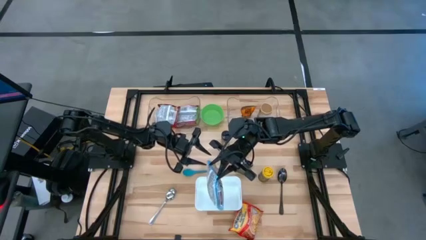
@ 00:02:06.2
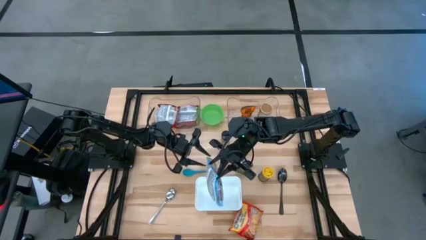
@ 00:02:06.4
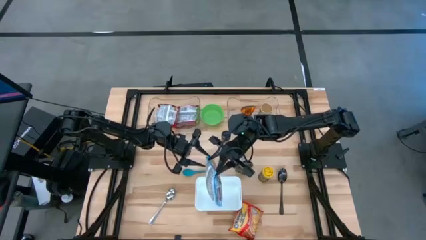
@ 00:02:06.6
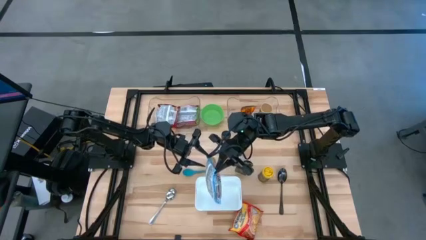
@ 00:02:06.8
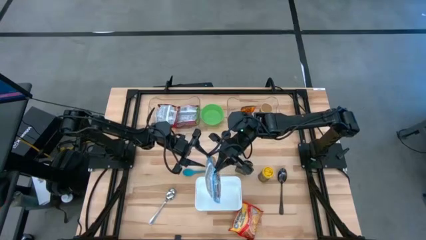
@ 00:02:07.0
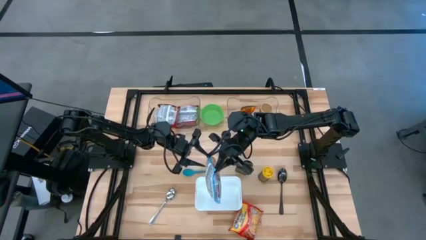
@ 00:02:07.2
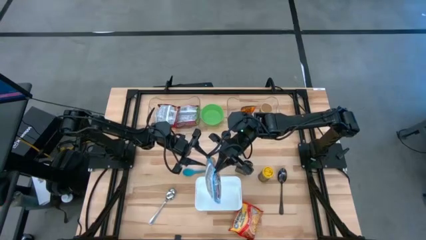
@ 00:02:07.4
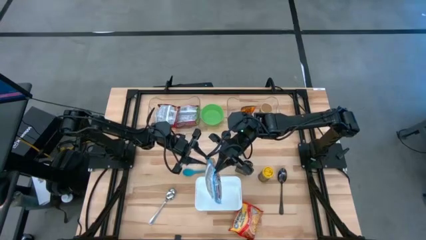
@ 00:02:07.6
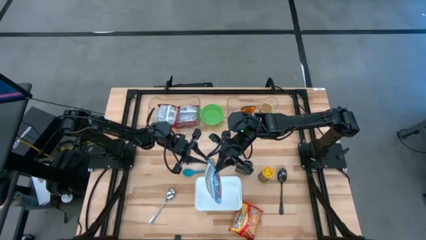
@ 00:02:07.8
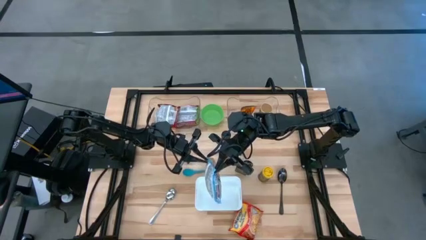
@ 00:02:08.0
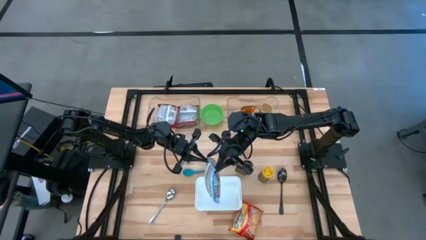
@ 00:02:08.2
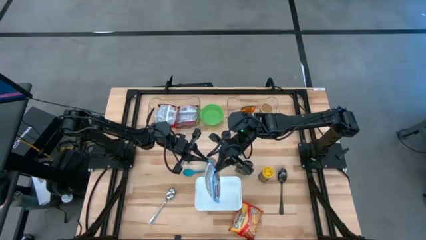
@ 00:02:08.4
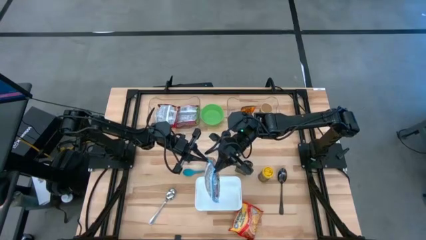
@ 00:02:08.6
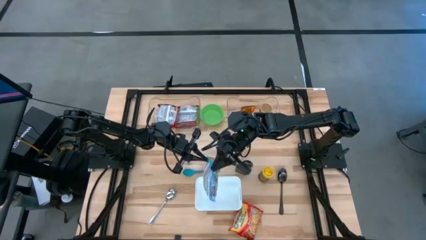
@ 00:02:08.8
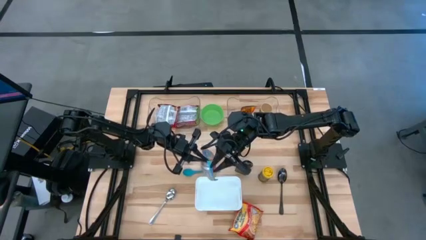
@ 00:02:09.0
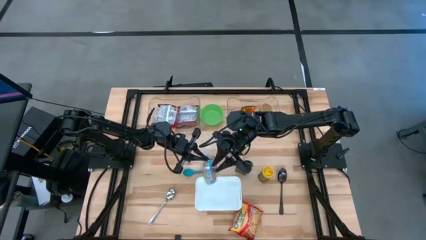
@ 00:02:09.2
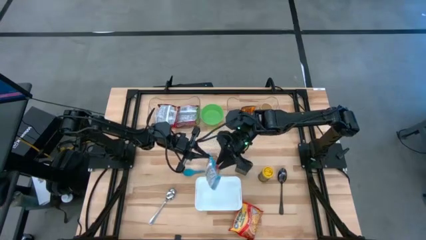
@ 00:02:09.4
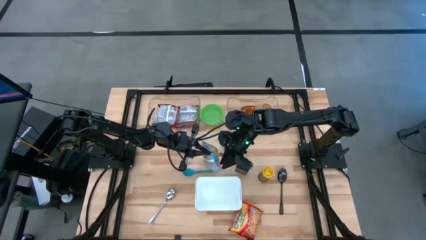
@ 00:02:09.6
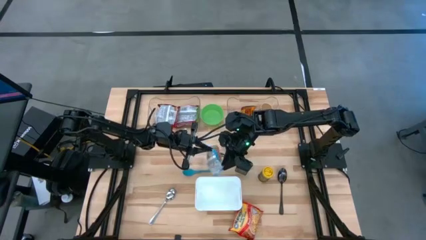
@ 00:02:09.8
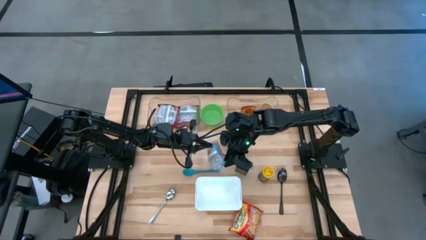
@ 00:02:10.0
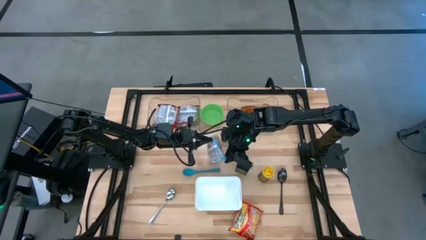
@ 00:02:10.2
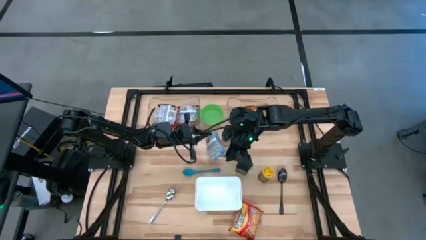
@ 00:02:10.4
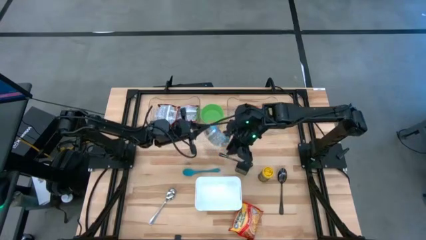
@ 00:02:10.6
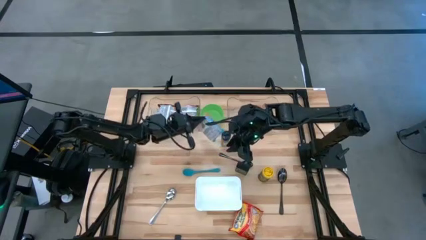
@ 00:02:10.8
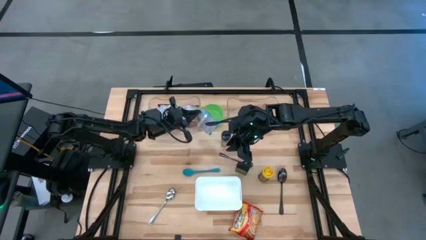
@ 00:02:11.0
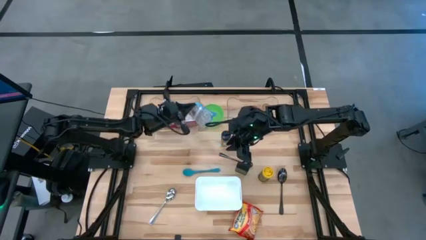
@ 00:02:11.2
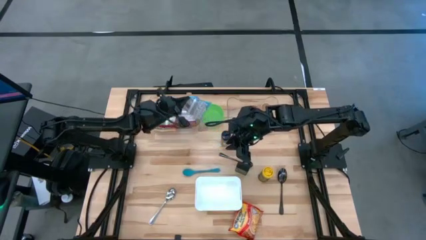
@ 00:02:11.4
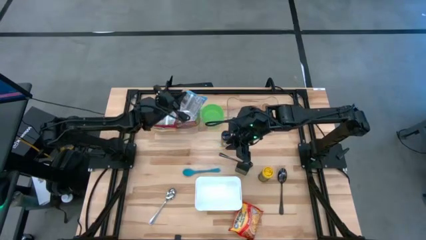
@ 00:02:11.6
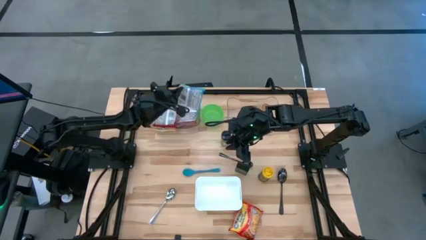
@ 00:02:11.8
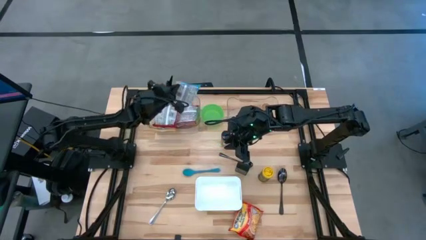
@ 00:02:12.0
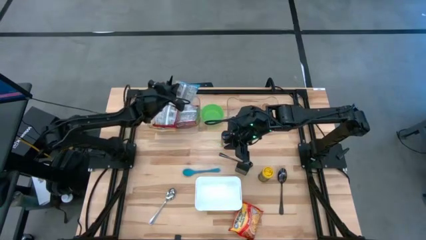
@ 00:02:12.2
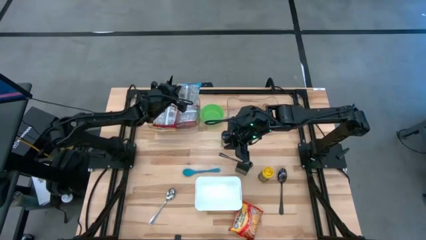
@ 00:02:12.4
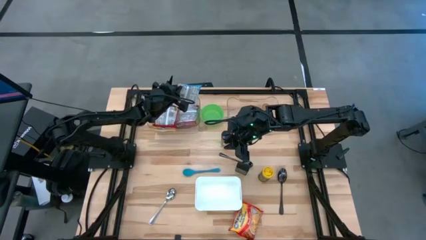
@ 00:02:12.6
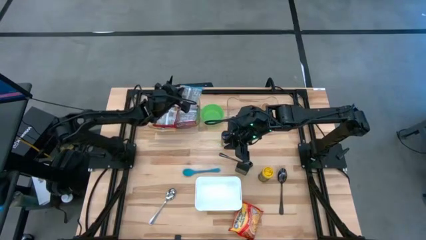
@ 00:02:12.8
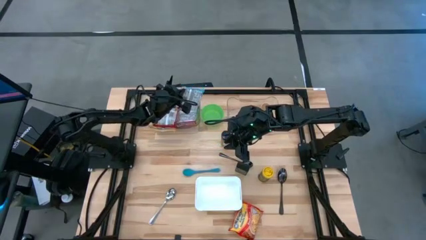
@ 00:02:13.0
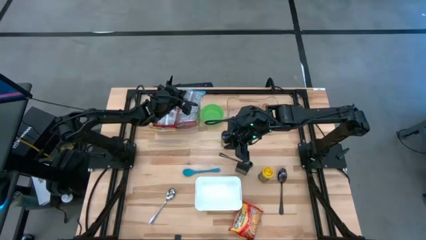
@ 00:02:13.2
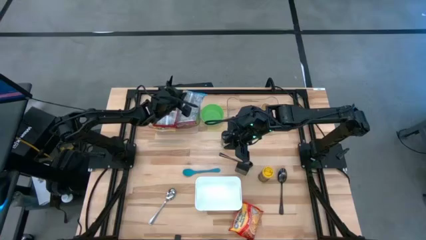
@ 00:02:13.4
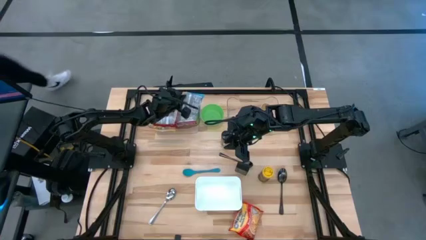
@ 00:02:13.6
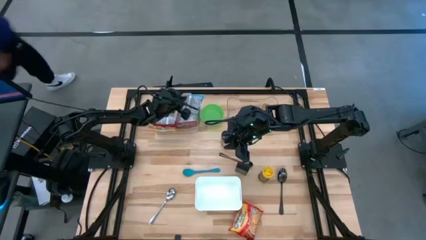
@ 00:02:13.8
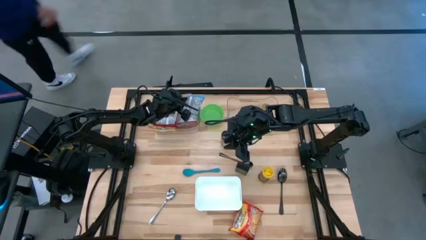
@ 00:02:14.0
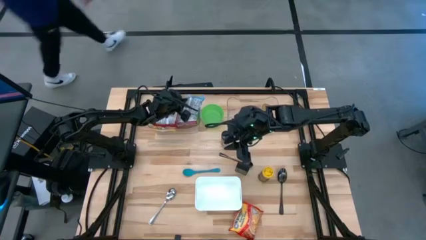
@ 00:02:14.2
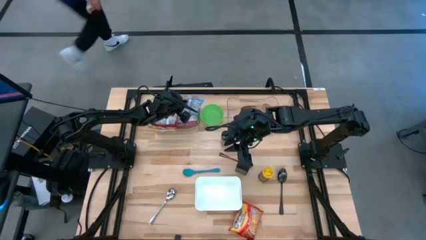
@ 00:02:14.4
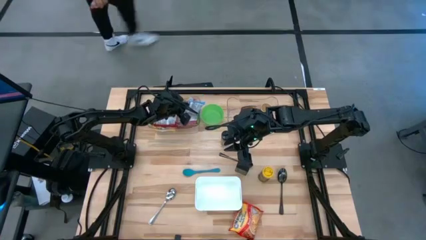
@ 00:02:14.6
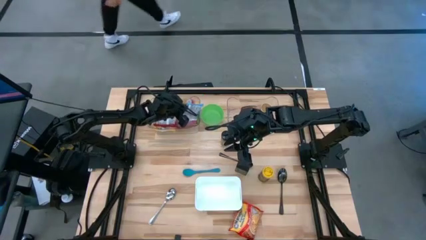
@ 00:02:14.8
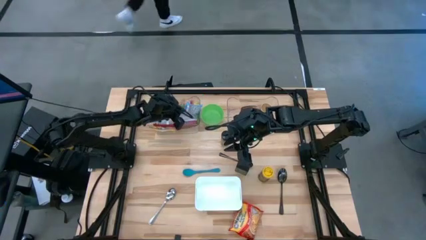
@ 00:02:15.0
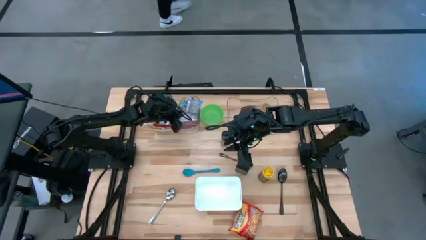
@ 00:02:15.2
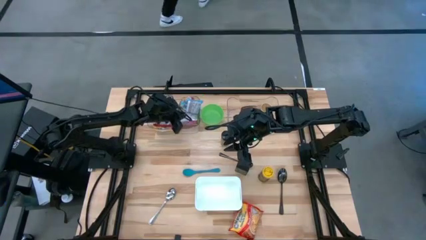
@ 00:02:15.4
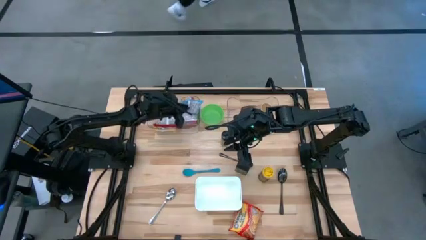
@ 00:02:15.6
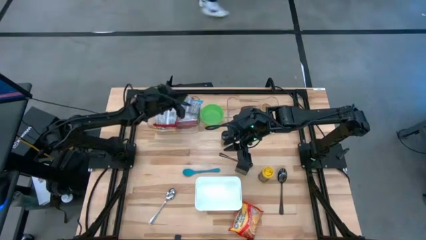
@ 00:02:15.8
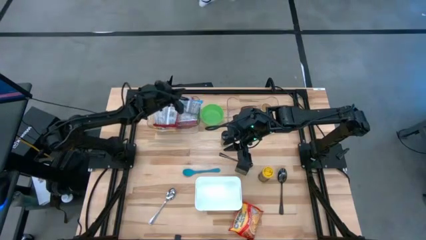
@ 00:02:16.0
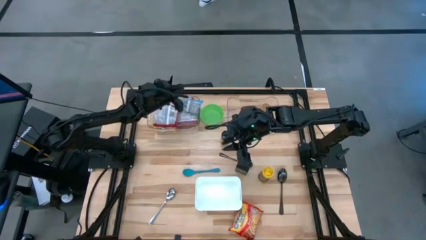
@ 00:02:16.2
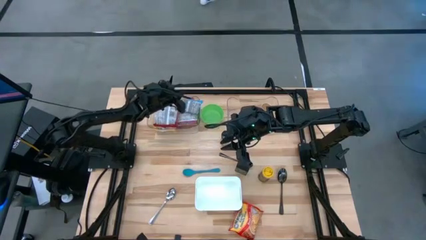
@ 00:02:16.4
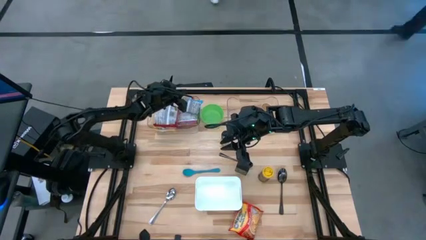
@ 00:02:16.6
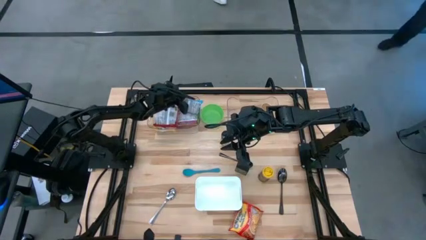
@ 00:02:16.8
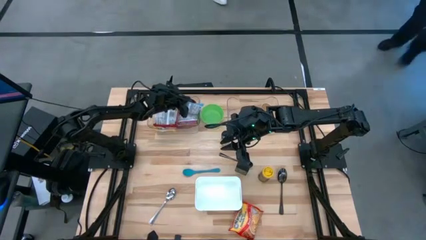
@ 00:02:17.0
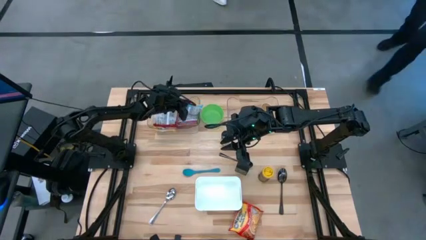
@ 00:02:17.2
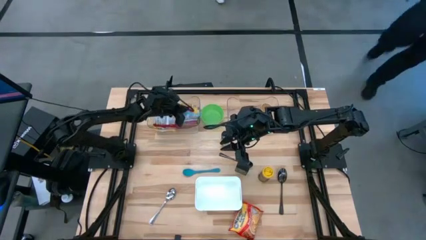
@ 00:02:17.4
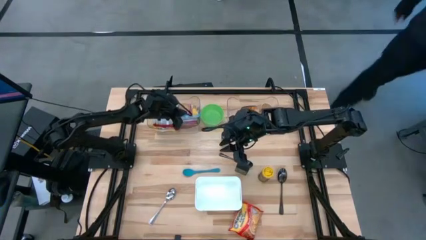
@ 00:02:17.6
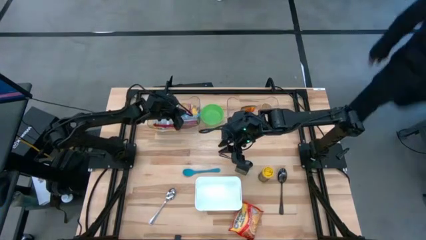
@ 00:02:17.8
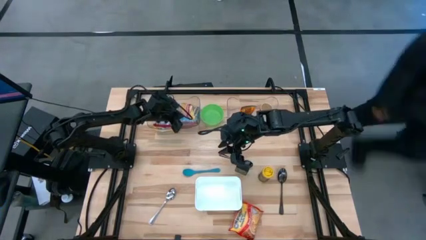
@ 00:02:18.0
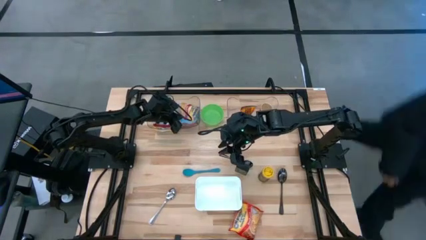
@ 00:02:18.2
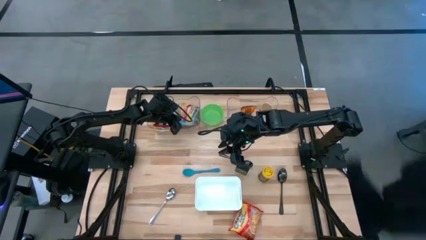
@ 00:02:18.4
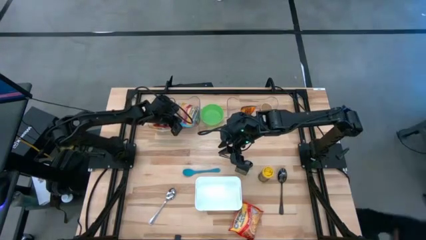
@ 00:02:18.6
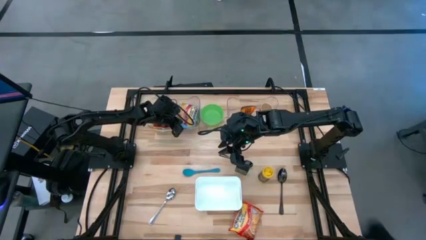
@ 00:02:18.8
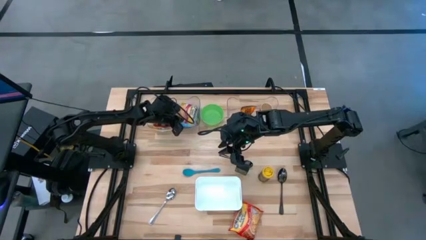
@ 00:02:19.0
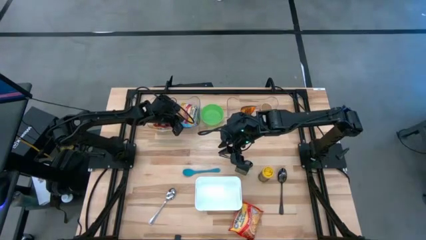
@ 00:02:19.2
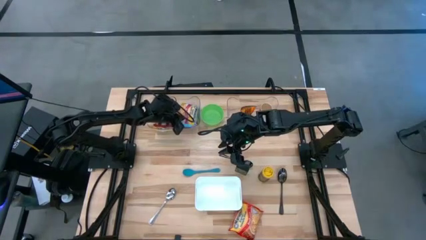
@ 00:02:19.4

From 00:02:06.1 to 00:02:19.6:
Task: Pick & Place Food Item
Put the blue noodle pack into the left transparent bin
